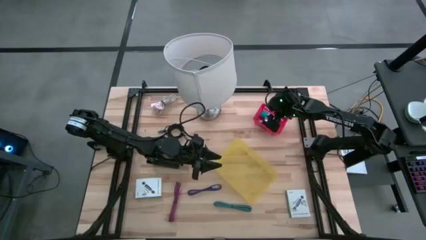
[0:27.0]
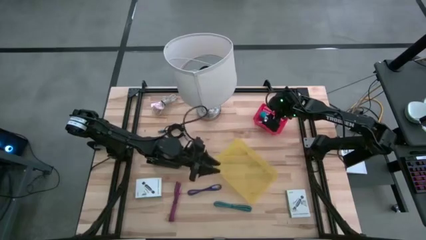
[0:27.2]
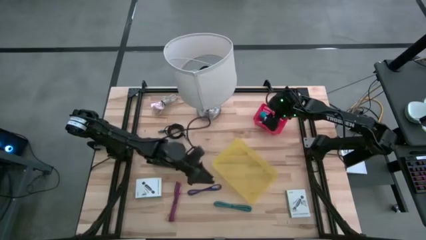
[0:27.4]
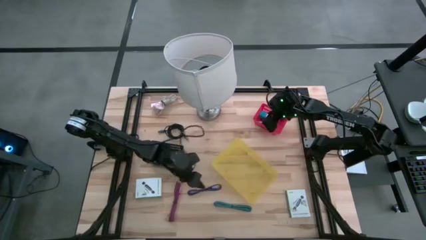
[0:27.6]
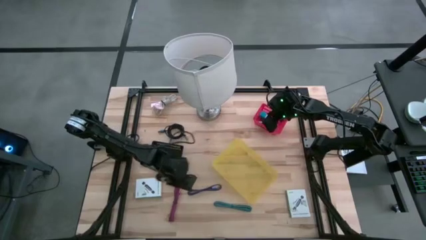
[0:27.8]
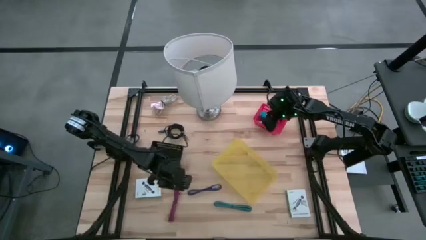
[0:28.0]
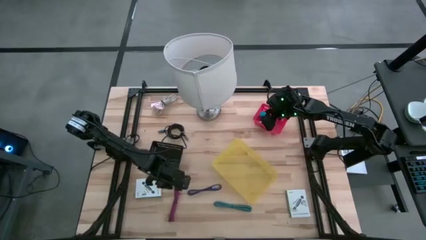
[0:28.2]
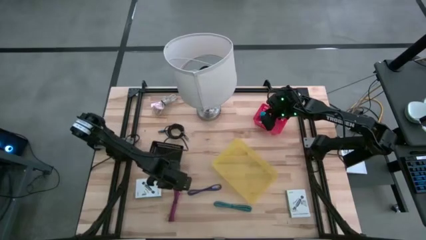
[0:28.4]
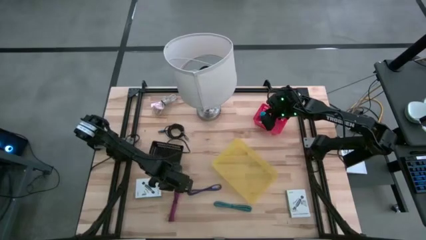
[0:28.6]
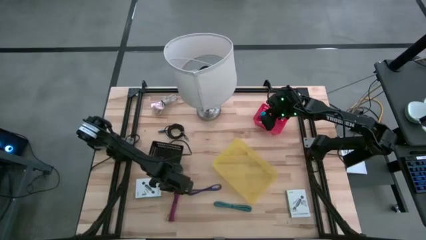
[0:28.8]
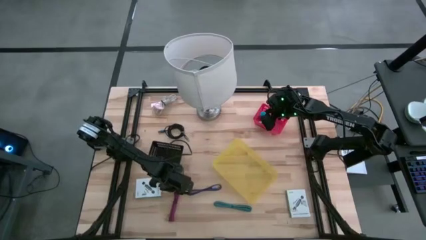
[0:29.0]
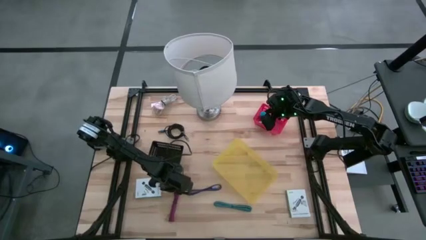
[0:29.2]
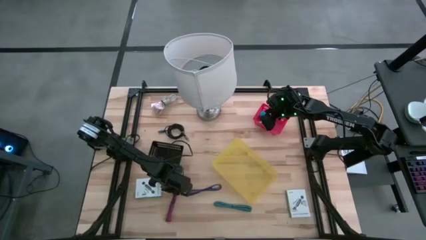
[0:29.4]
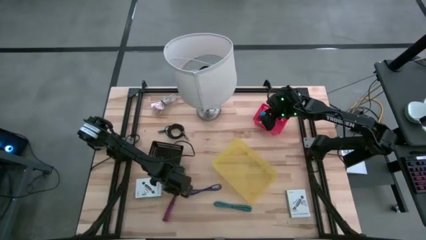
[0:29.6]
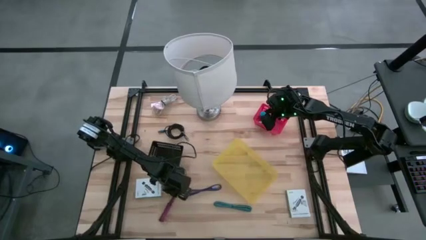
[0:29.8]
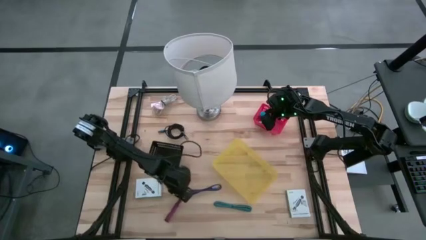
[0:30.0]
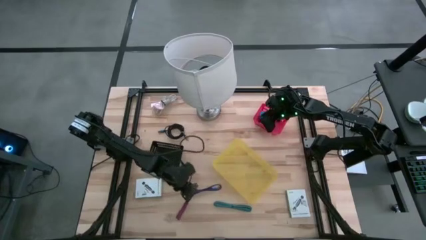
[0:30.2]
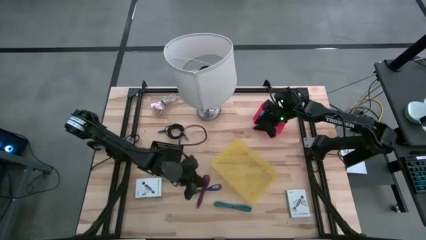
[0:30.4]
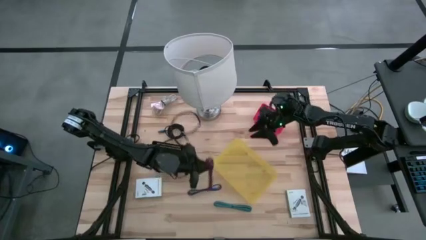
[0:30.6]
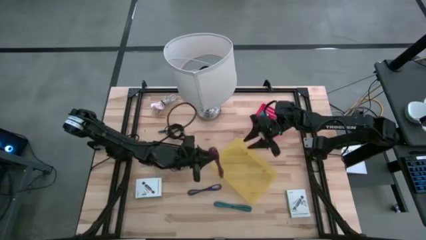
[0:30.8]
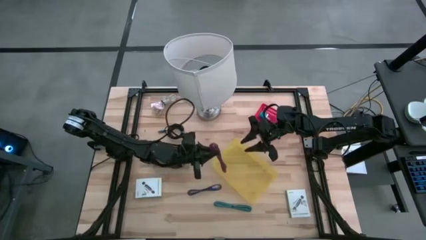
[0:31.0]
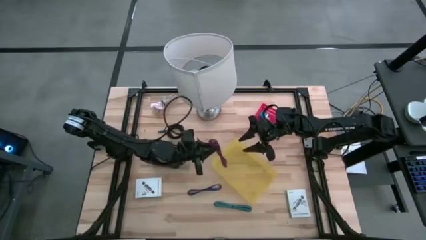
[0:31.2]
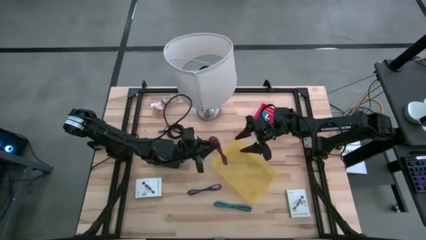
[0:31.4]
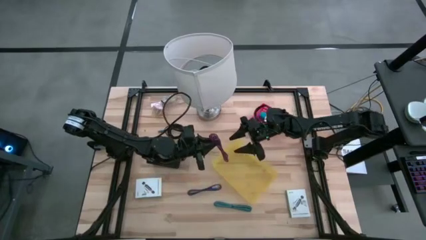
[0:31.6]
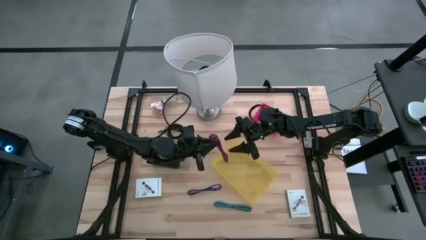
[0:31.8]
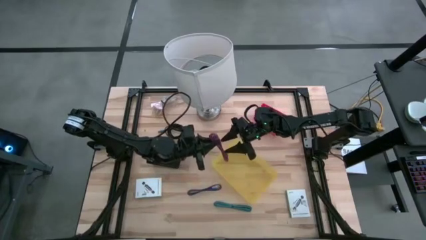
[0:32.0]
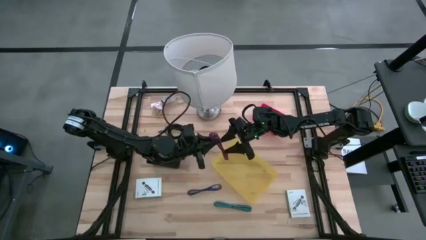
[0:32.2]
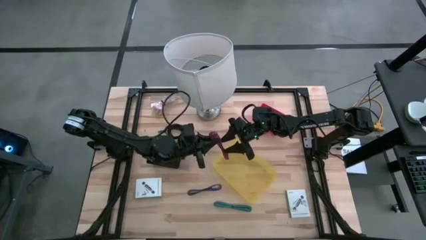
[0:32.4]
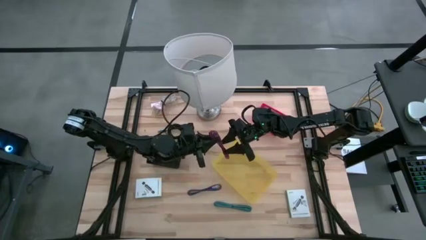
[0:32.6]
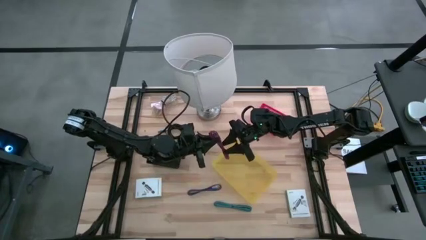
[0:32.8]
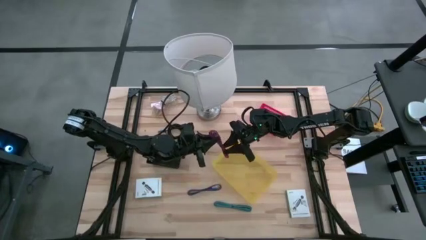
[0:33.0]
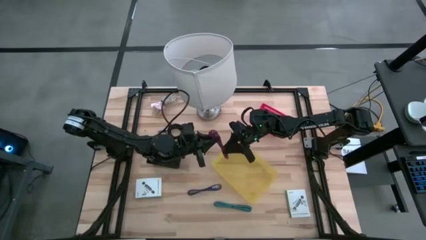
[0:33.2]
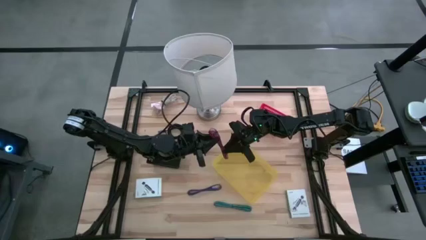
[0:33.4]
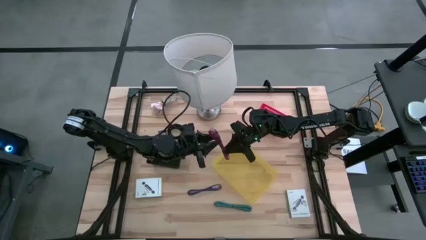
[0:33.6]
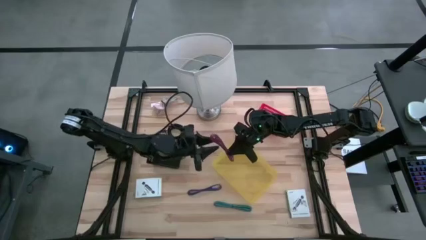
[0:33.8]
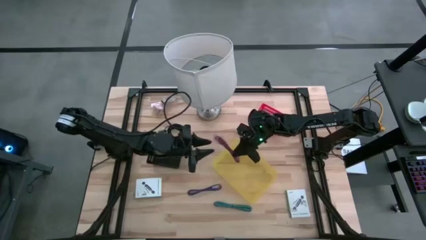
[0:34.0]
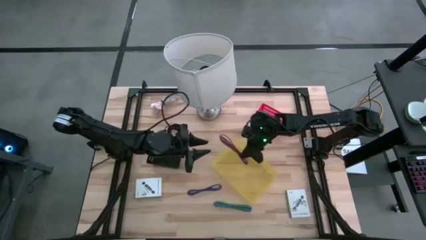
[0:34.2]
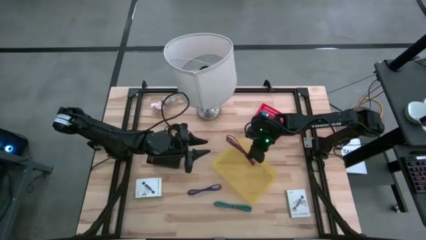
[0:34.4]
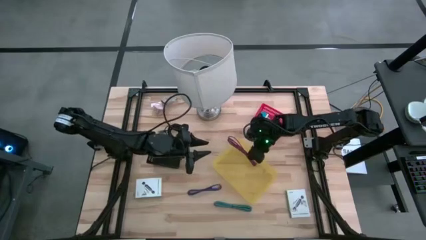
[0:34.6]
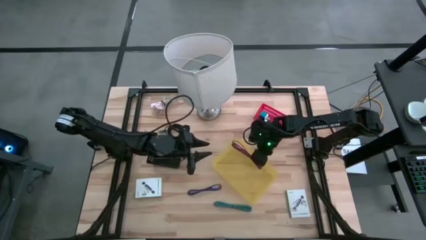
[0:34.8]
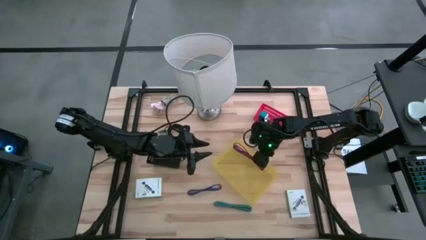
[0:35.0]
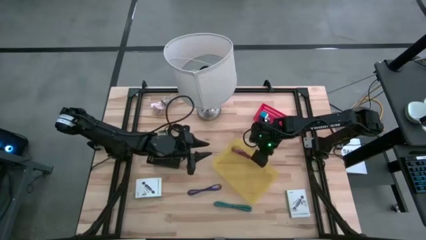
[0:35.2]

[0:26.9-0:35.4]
Task: Pick and place items into bin
Put the pink charger cable into the yellow bin

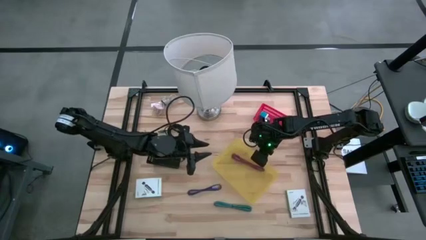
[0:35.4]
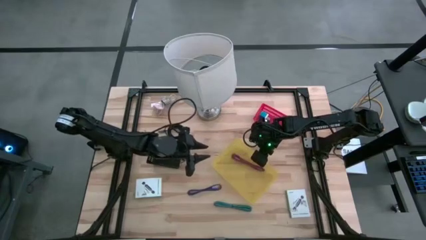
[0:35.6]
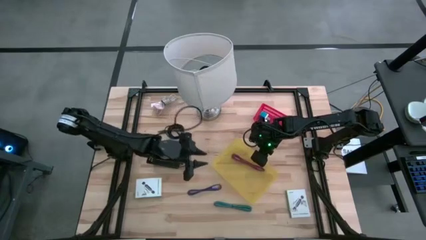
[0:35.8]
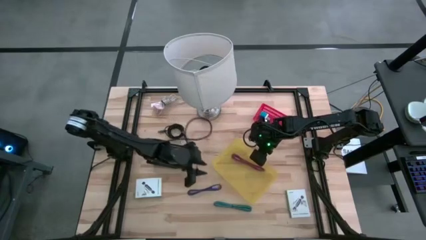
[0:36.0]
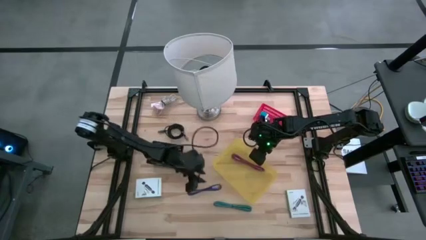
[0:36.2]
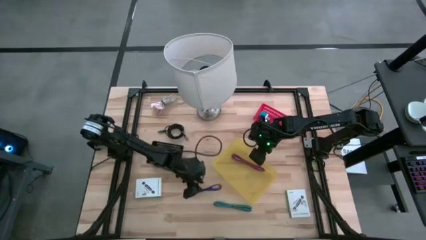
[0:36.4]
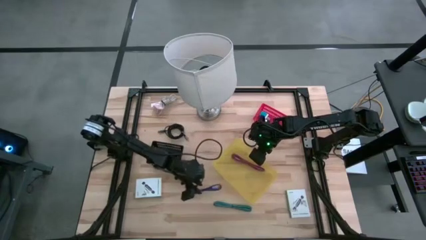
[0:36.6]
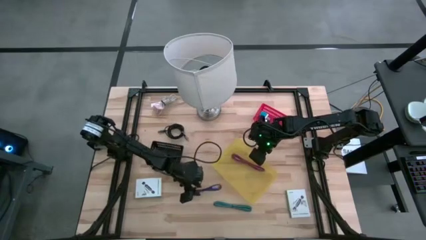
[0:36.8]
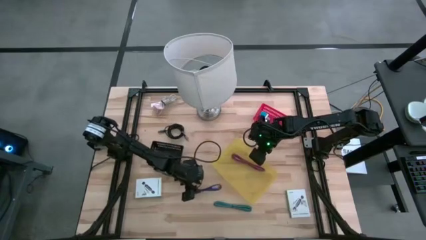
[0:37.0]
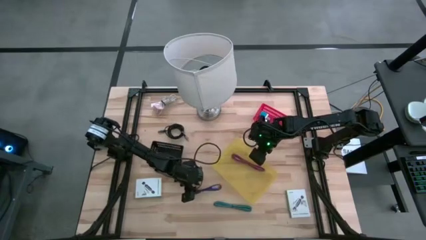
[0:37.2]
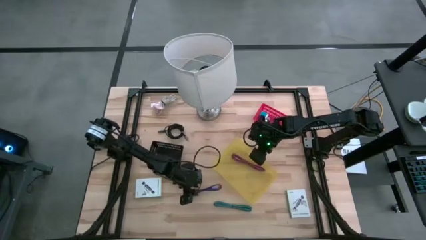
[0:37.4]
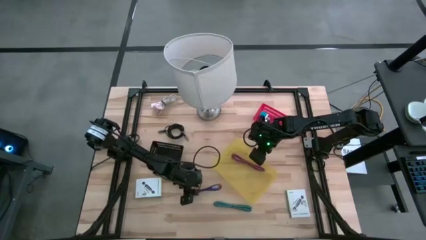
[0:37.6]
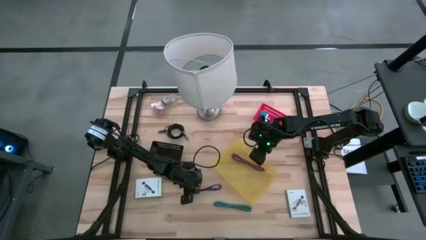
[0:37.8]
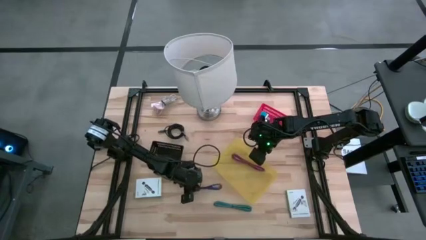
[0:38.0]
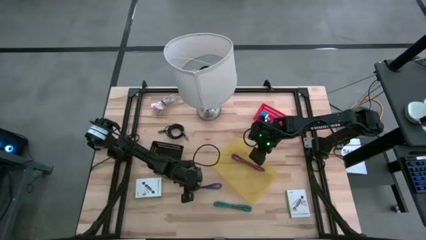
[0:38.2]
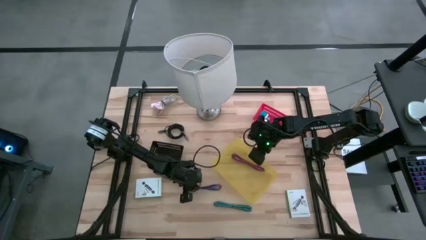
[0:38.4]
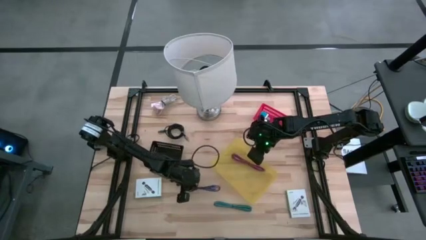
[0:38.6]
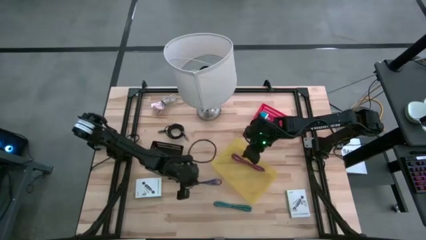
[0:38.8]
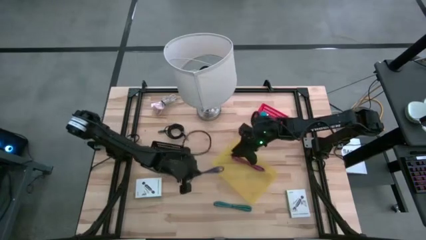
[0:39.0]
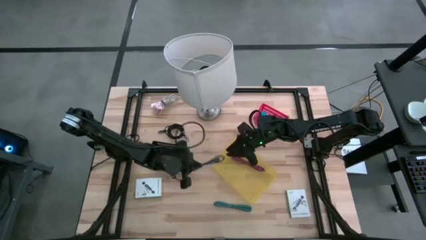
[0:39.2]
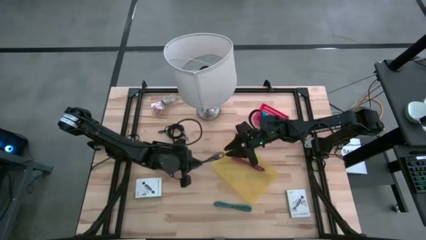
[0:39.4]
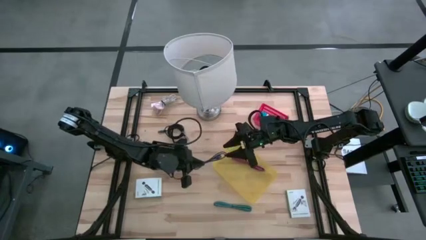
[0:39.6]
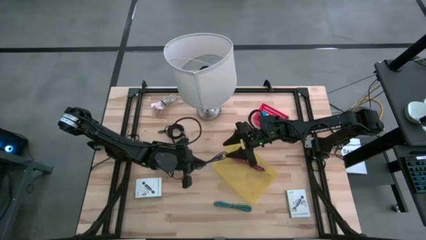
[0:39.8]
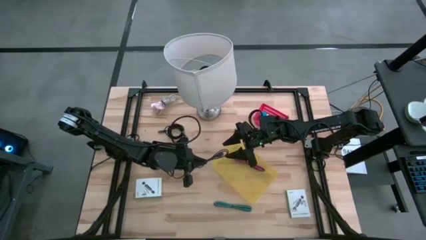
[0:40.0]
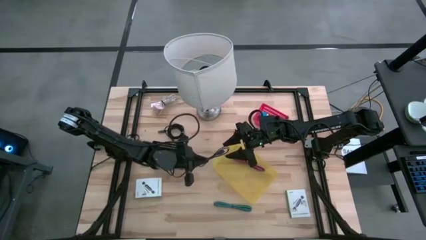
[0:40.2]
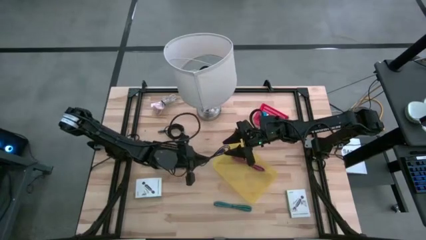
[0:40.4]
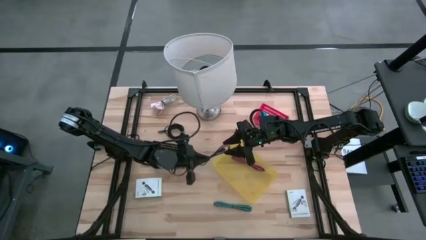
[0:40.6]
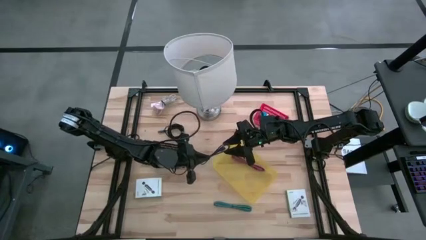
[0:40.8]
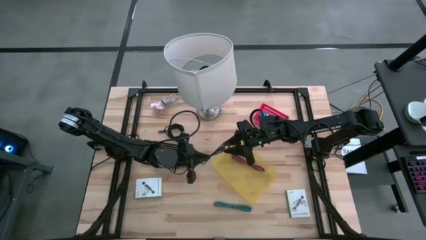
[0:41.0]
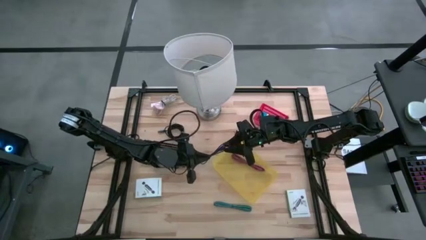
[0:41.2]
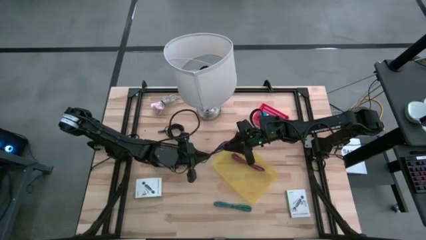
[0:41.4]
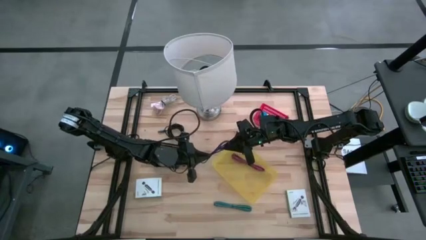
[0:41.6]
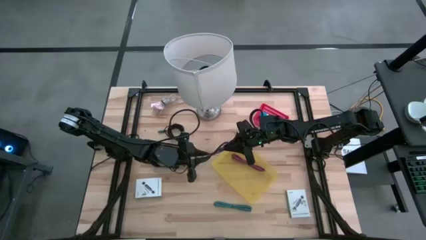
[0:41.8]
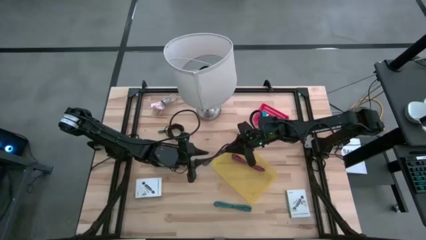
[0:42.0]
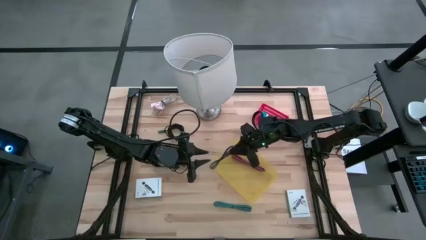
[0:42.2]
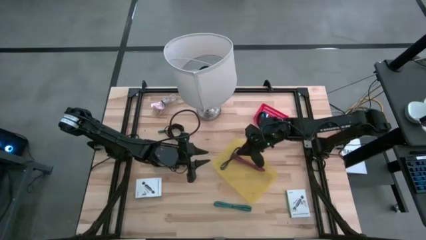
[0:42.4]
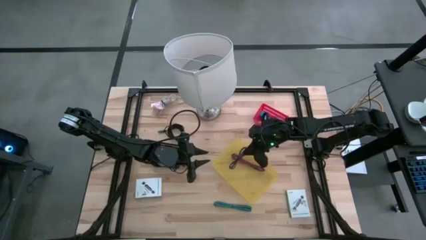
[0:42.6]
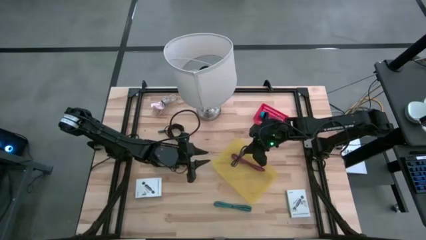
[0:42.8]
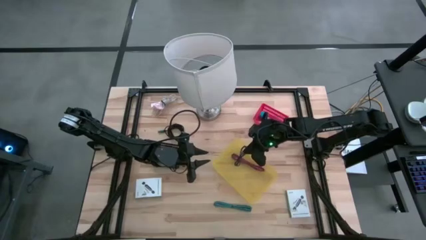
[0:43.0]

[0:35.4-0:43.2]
Put the blue charger cable into the yellow bin
